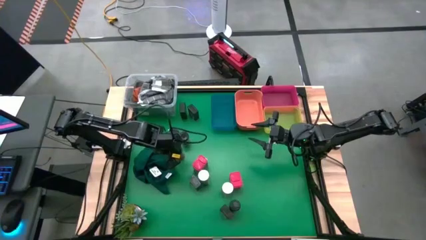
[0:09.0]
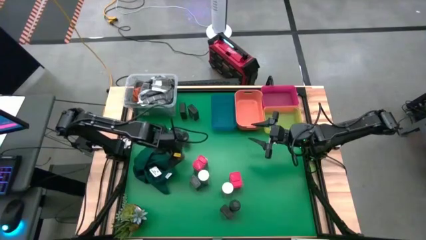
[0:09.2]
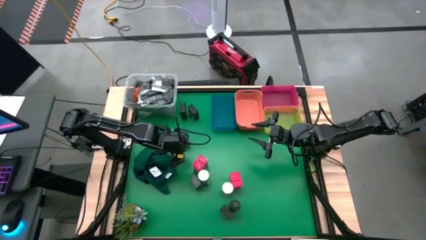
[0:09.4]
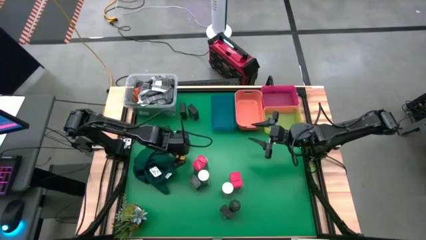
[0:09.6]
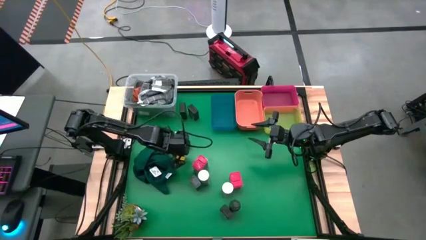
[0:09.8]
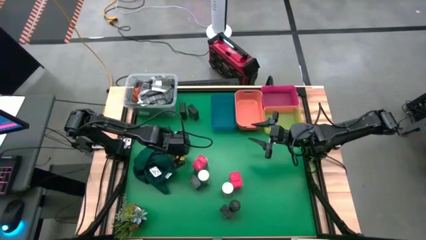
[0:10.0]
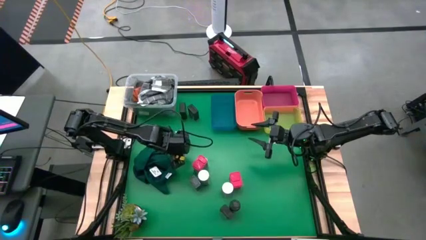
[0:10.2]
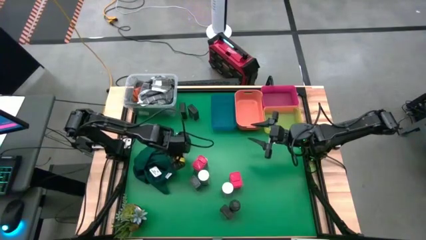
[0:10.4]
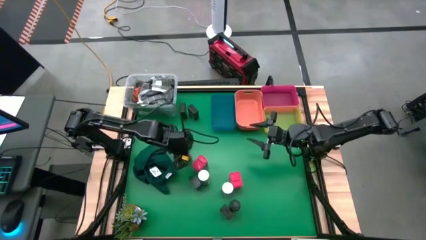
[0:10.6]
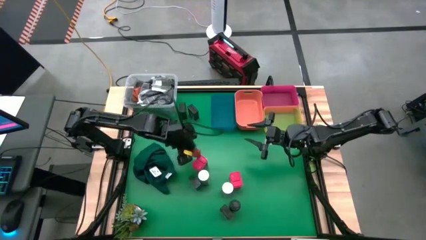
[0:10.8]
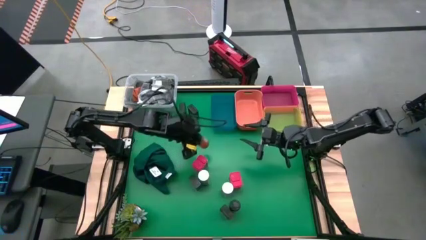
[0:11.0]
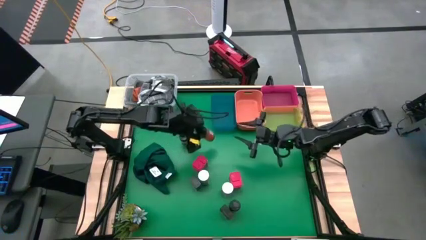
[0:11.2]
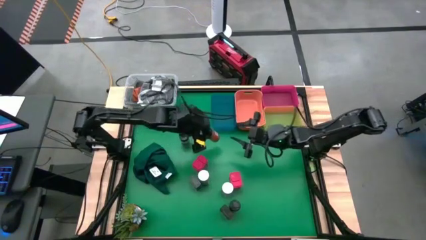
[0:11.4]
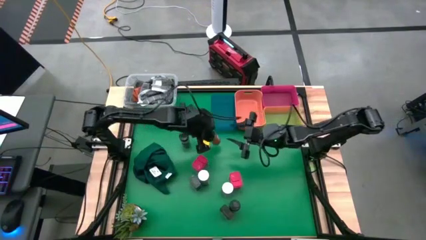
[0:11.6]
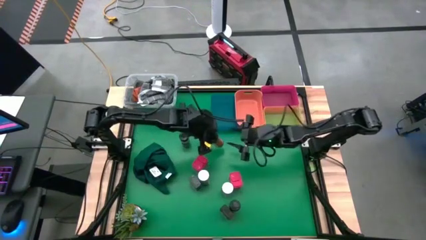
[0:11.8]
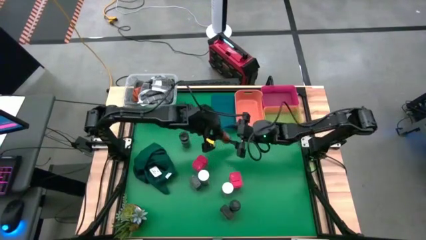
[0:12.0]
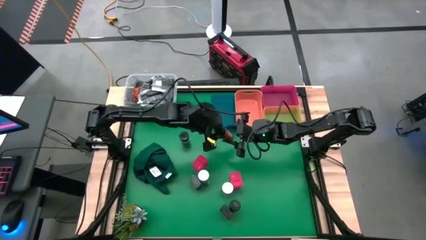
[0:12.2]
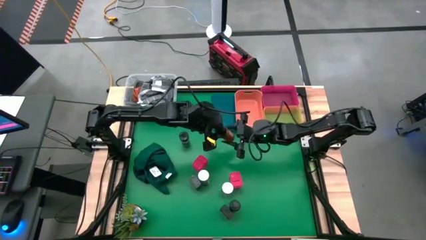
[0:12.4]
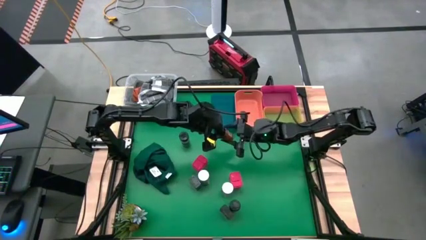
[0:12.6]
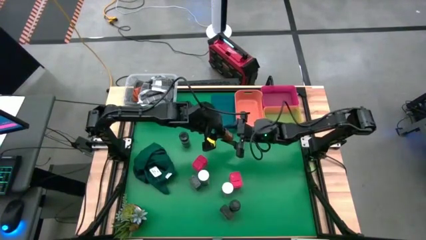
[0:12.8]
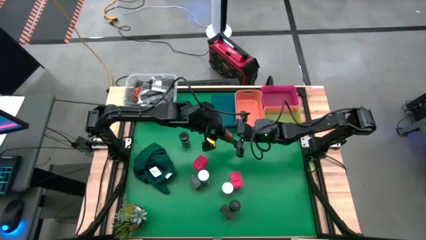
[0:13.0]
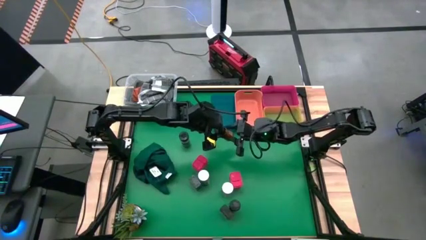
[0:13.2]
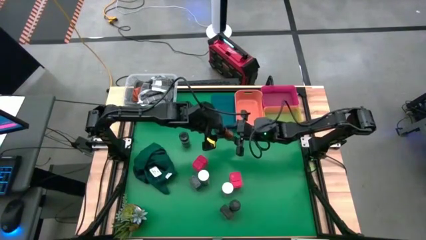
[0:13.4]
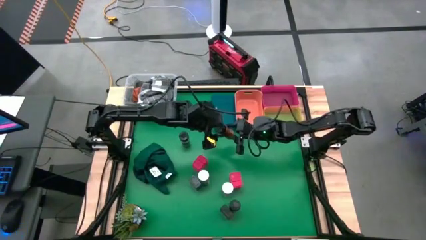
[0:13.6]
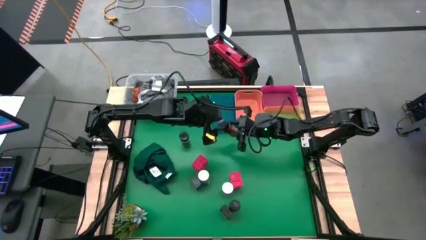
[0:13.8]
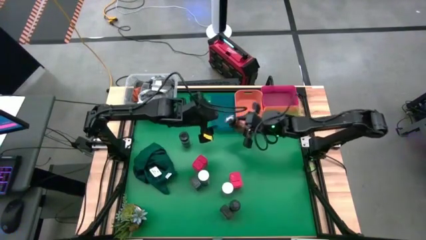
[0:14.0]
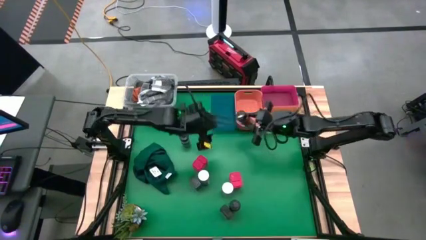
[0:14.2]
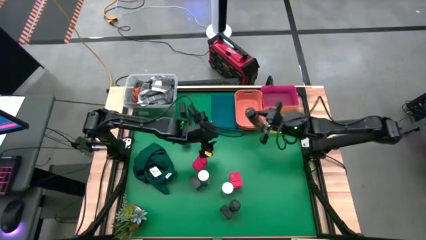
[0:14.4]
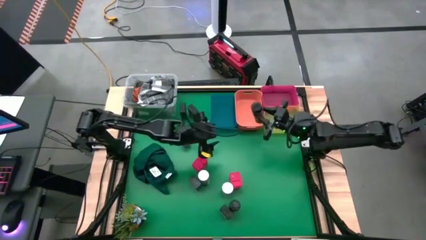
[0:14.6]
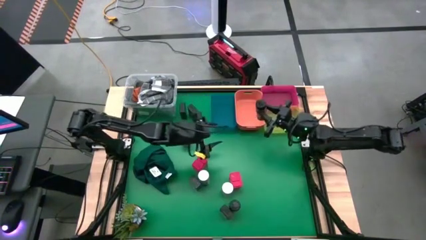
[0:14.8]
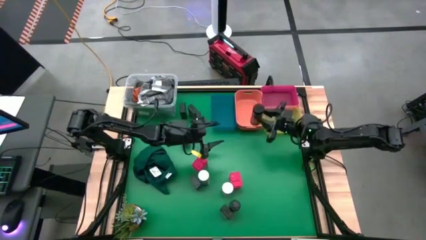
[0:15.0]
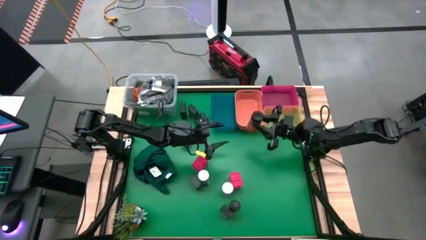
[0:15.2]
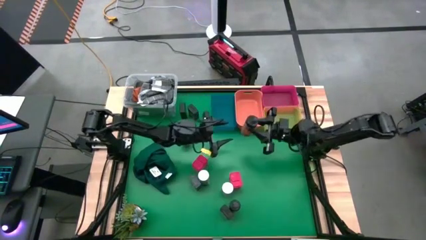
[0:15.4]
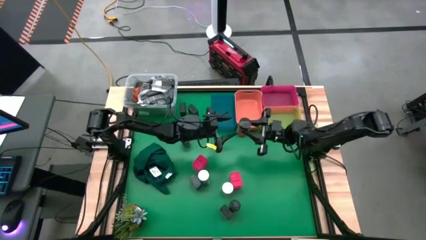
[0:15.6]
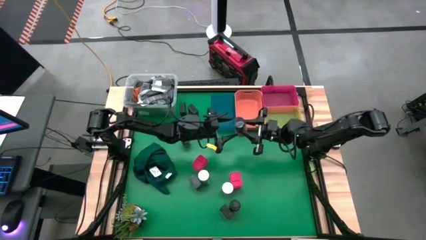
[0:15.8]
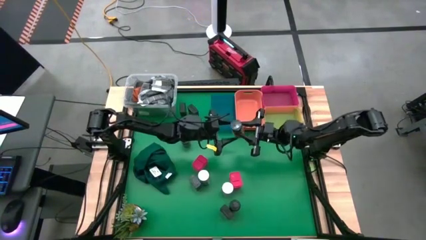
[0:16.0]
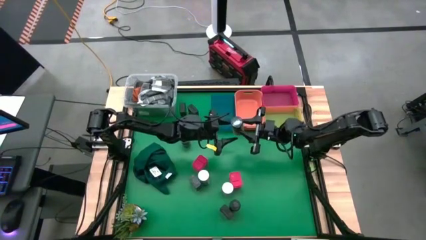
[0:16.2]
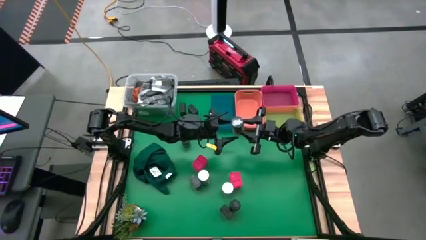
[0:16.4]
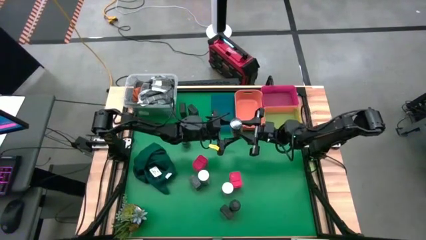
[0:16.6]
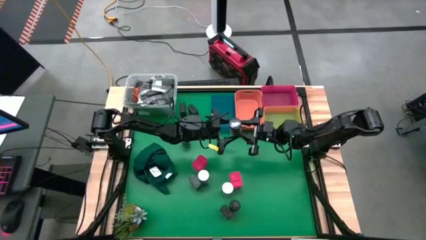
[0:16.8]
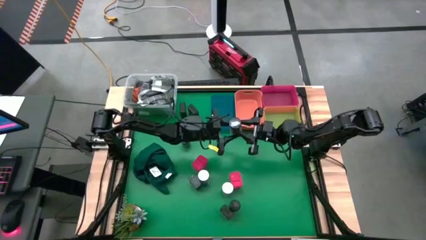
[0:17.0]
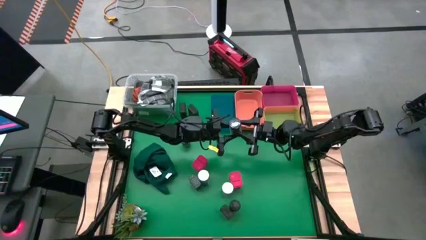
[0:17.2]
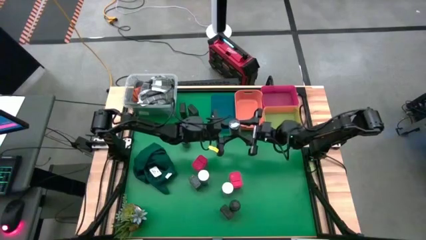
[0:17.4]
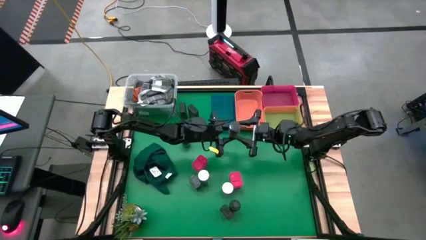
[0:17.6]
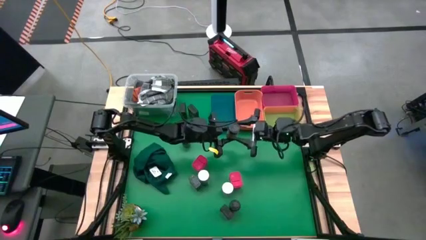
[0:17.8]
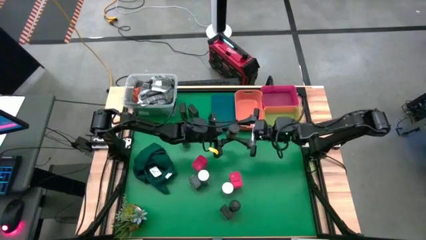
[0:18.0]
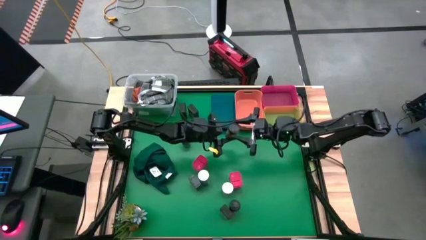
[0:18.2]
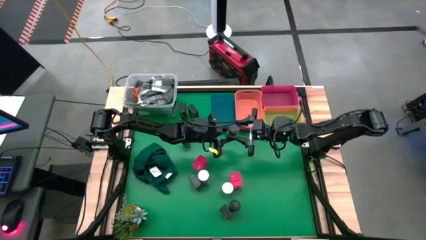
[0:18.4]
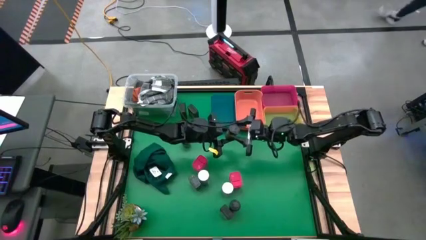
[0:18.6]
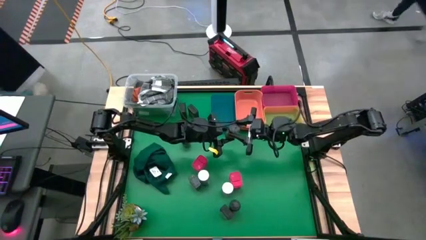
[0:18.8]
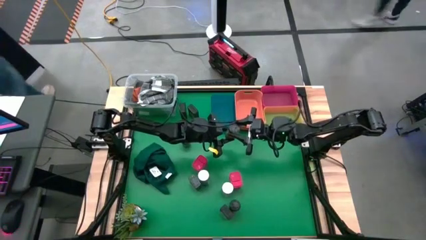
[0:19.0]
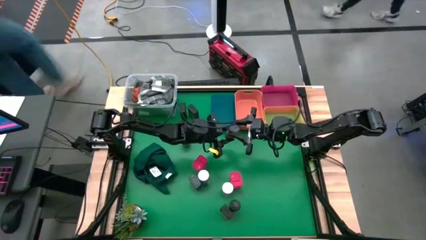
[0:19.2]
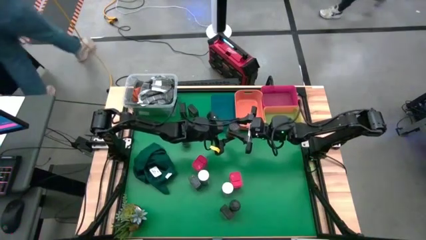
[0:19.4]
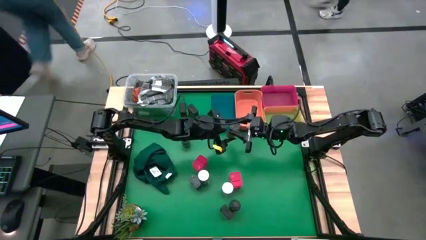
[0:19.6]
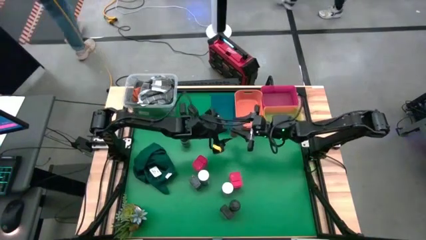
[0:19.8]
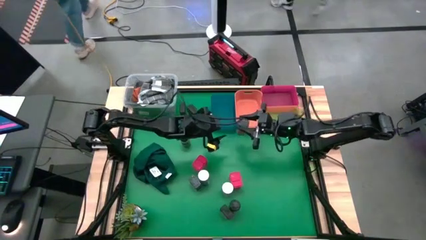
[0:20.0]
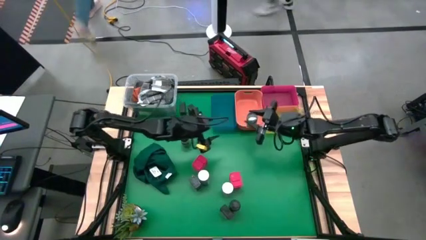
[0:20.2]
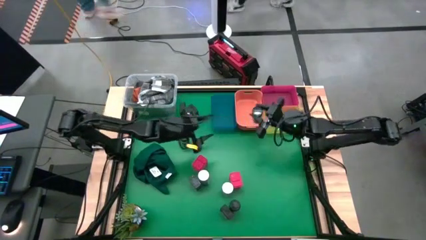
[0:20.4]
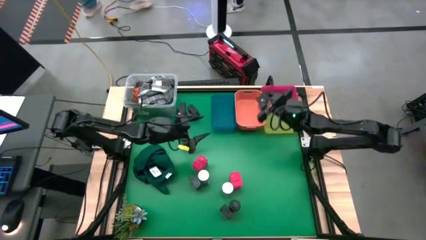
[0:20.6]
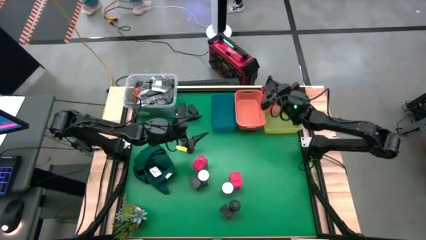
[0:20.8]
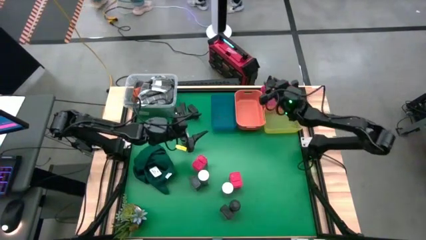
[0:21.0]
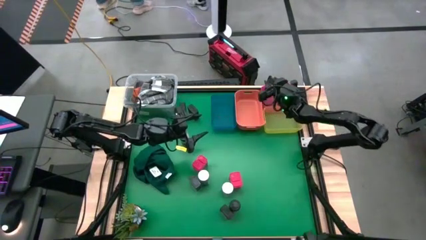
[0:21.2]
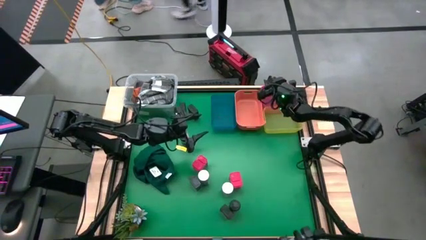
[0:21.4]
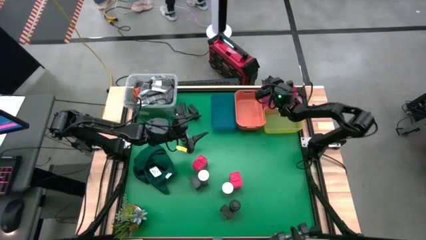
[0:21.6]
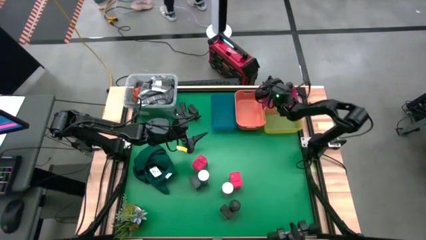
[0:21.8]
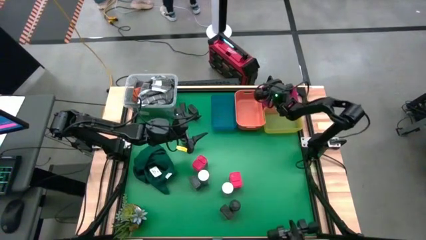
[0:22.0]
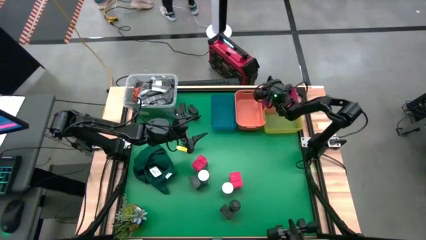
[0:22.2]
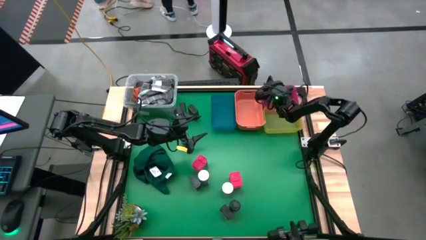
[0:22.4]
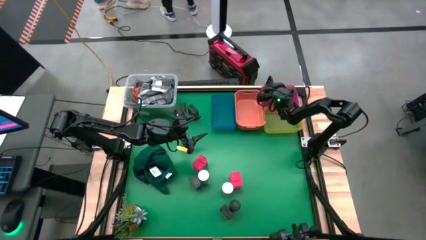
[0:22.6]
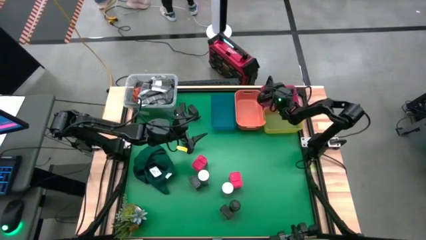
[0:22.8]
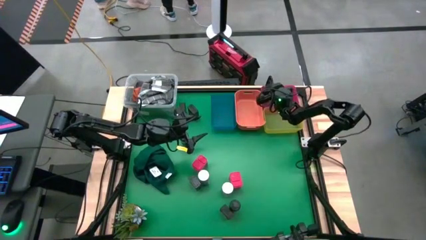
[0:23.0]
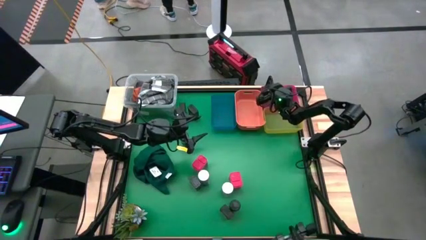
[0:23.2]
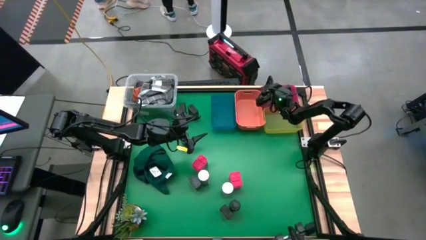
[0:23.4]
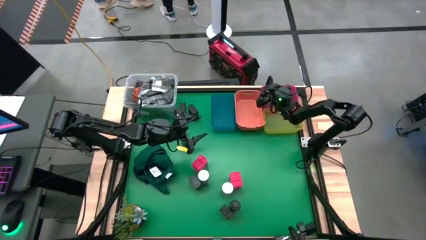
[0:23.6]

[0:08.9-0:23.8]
Task: Sort spices by type
Put the middle black seasoning bottle into the pink bin
